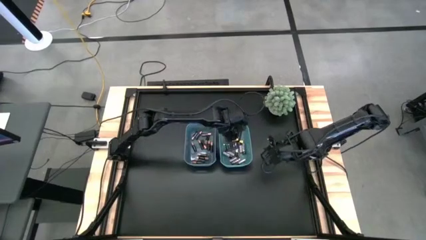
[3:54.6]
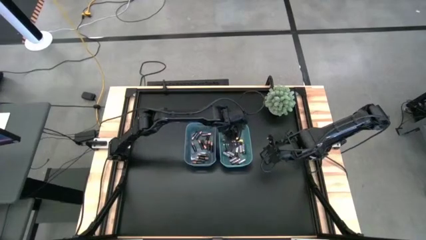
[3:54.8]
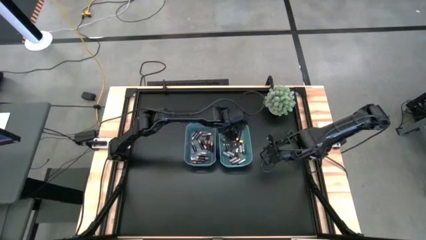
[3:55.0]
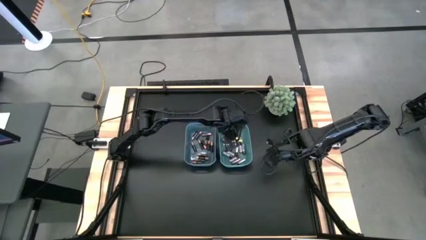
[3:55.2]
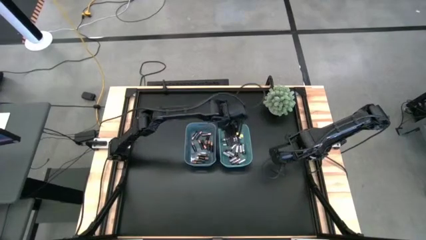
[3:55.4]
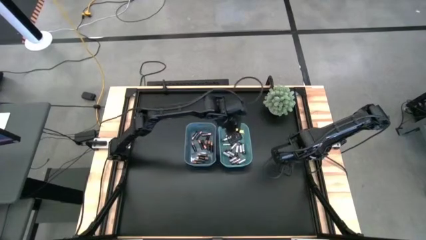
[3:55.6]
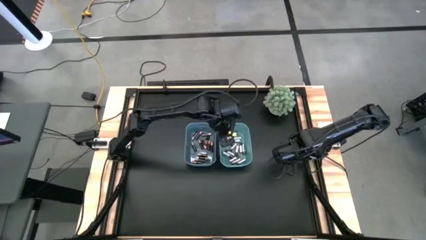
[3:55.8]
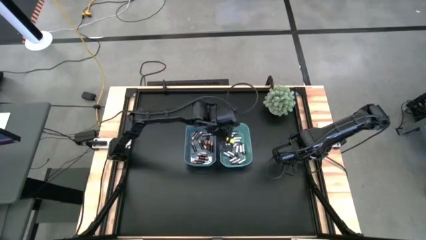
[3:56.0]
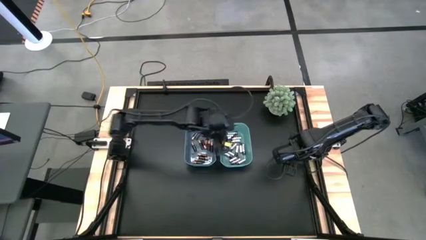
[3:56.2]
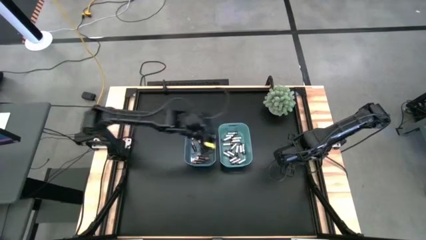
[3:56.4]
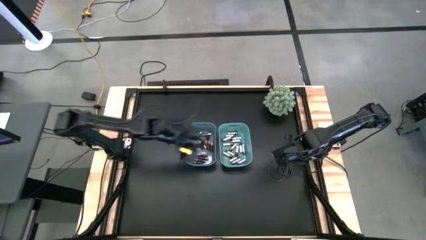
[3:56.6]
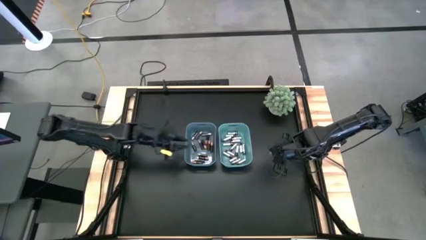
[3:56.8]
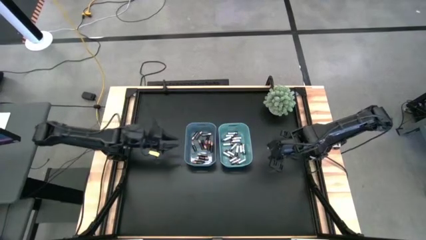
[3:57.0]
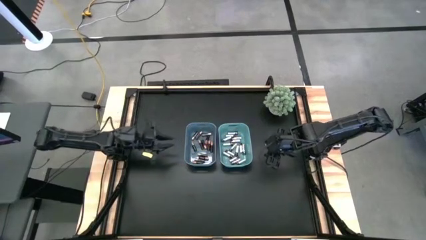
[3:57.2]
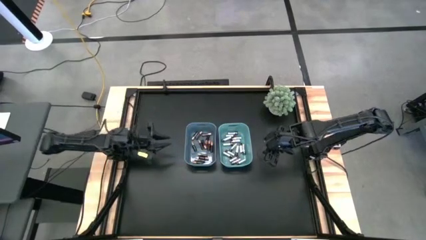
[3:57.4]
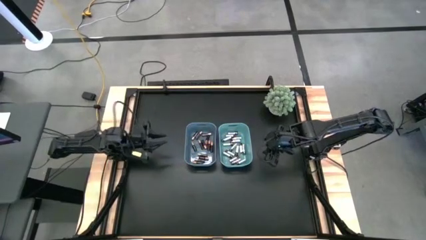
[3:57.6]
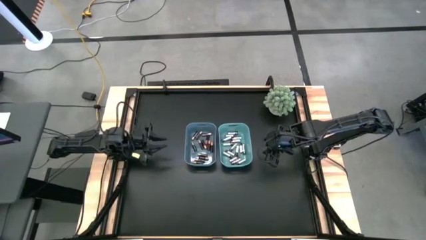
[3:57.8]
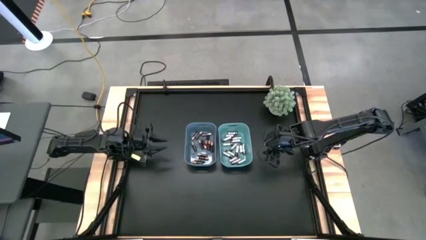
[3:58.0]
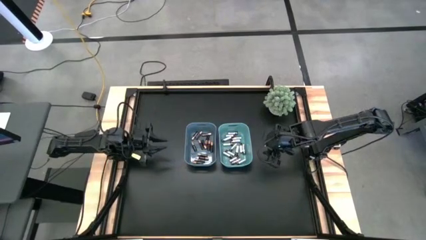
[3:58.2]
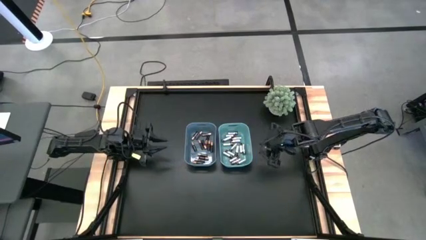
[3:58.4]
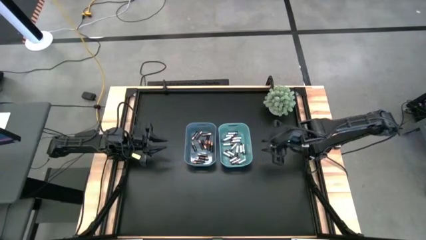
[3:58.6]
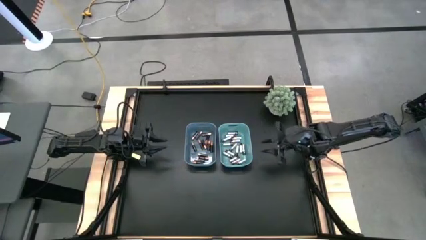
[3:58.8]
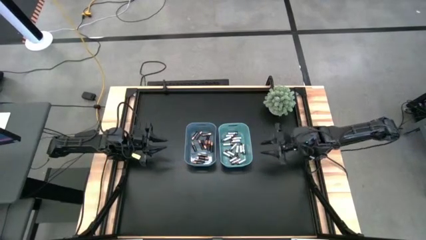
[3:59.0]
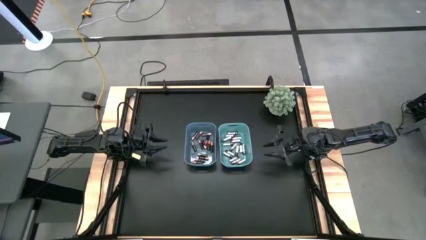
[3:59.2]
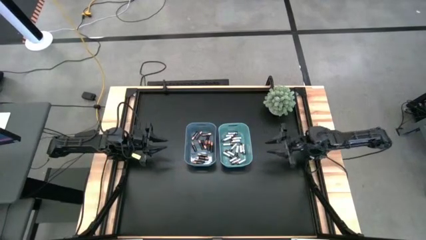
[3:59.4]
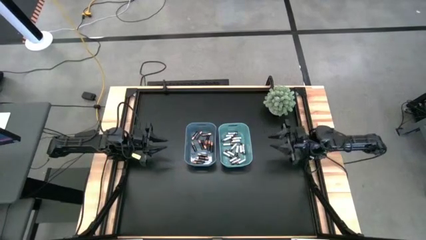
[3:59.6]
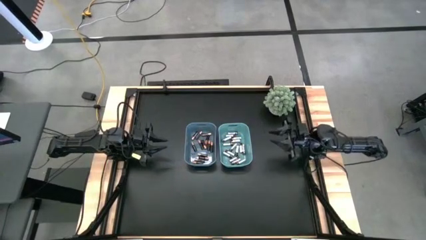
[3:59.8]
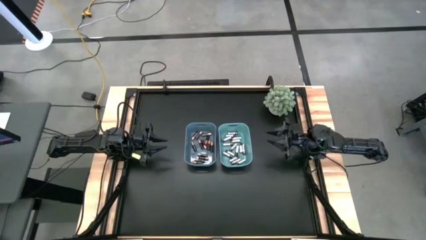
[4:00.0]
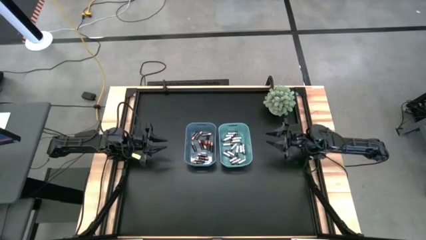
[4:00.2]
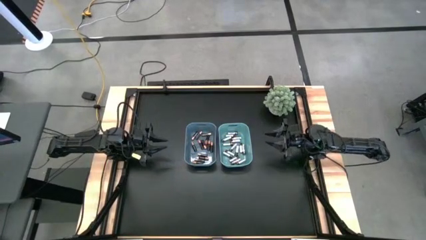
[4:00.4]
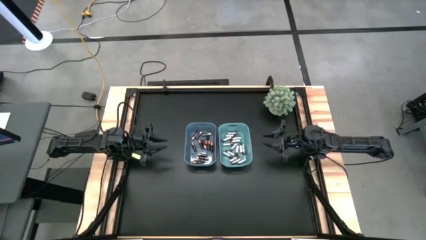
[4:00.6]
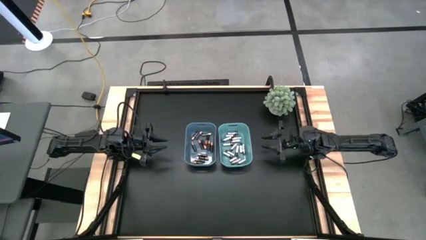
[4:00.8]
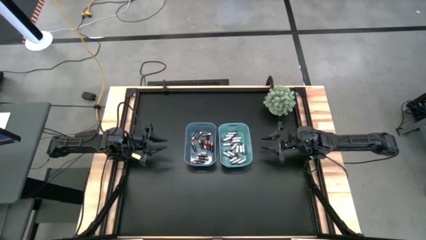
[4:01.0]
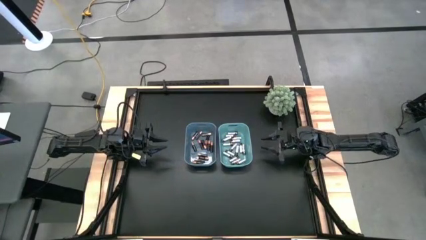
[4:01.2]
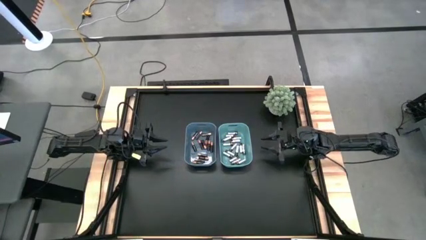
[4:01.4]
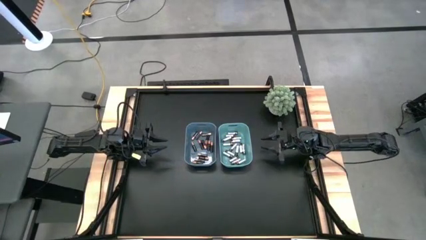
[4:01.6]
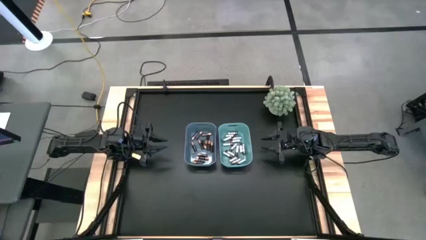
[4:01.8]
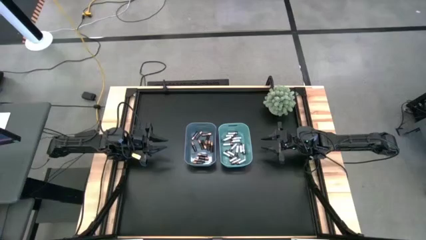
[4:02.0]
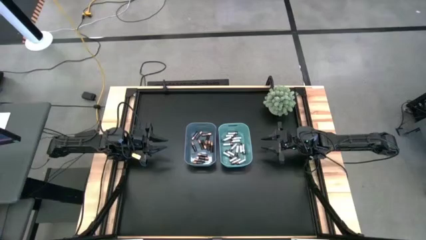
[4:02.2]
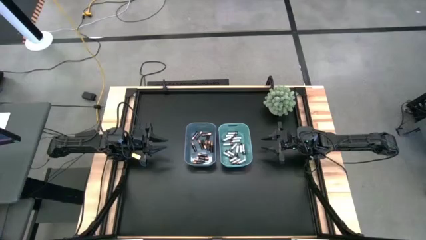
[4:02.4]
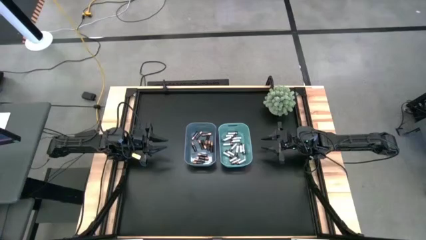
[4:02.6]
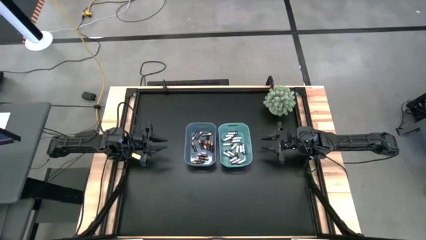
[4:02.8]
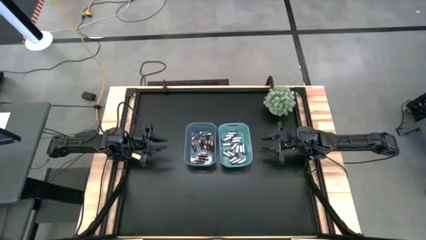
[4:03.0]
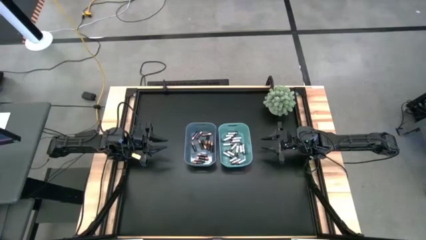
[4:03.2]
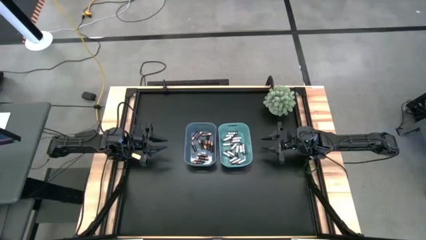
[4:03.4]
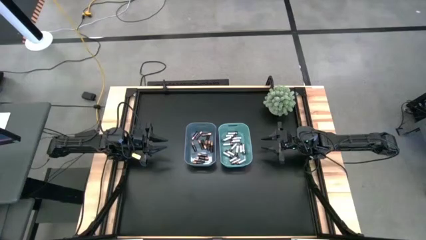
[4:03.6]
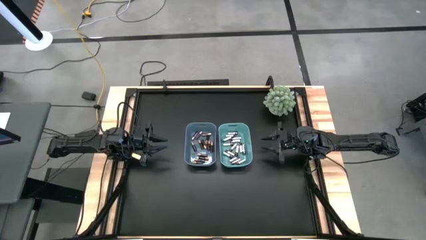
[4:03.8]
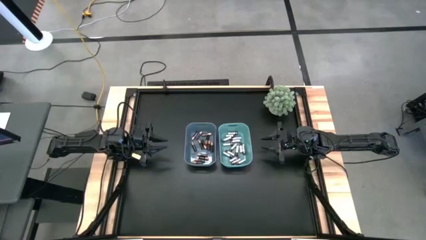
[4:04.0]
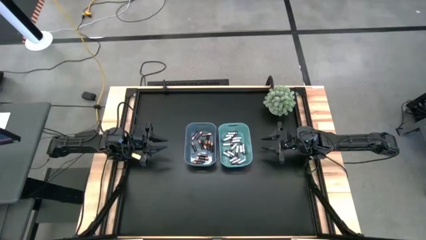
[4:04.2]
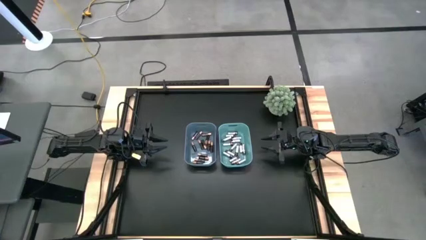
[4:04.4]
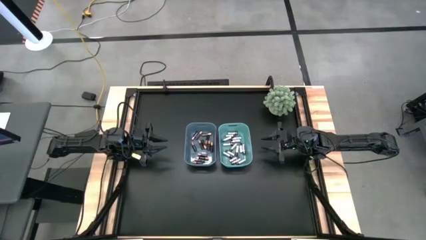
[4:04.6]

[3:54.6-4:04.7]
Task: Sort batteries
Return to Home Position

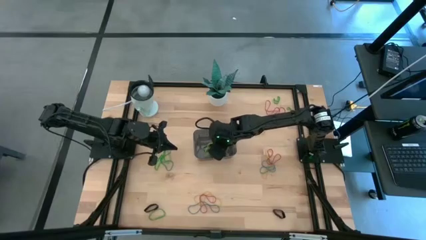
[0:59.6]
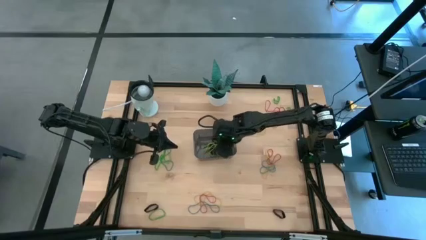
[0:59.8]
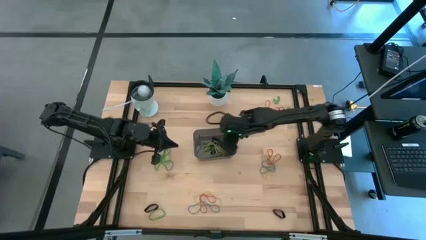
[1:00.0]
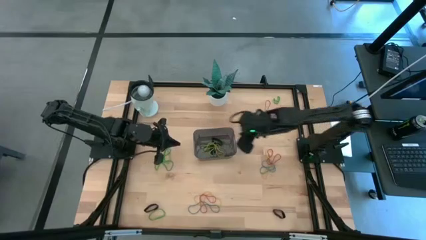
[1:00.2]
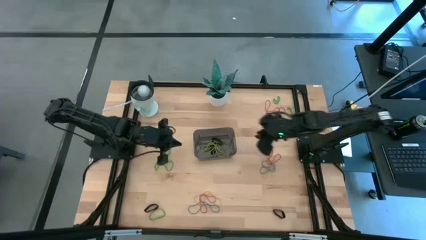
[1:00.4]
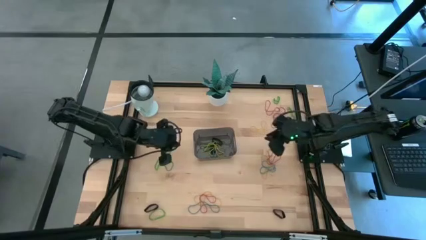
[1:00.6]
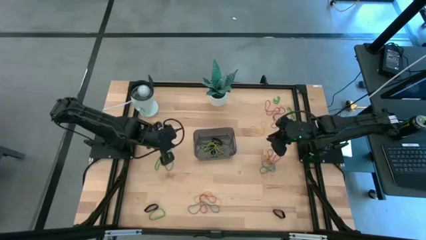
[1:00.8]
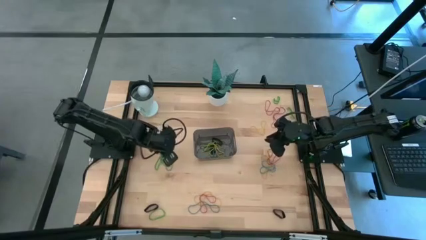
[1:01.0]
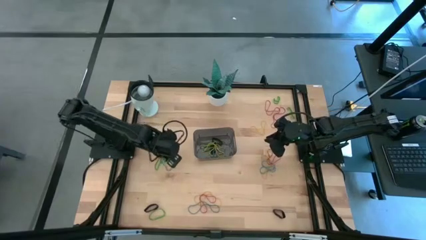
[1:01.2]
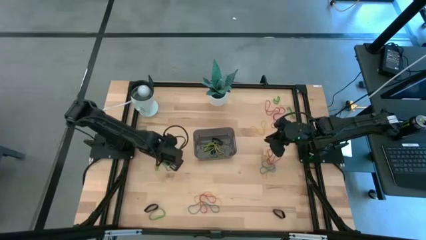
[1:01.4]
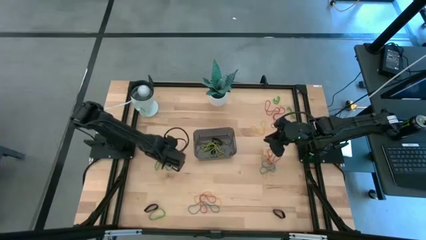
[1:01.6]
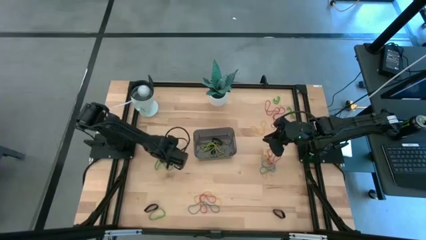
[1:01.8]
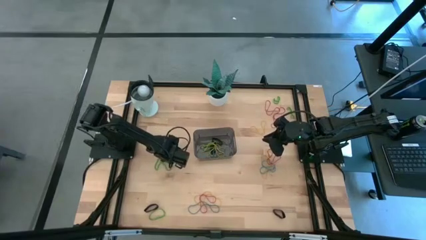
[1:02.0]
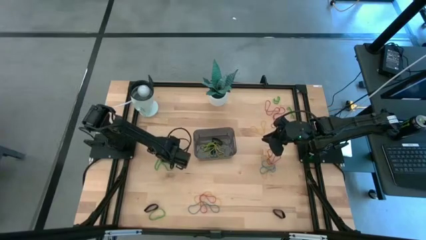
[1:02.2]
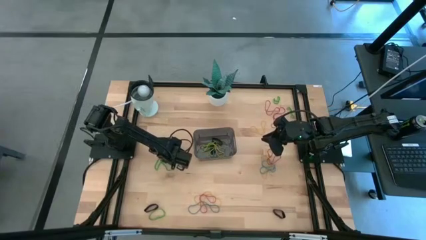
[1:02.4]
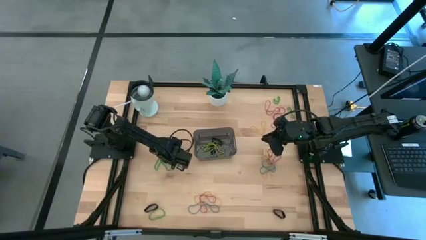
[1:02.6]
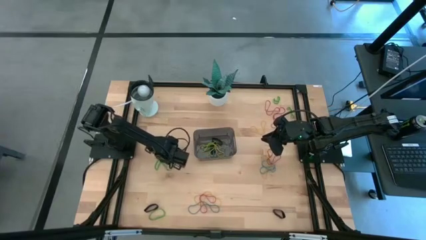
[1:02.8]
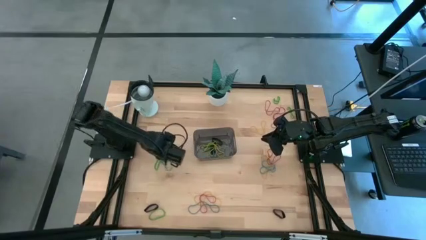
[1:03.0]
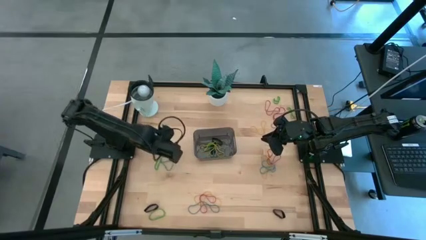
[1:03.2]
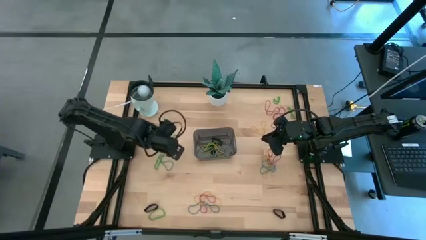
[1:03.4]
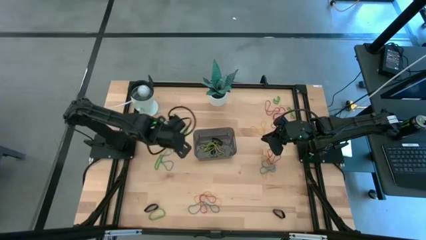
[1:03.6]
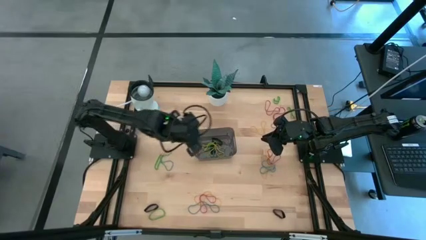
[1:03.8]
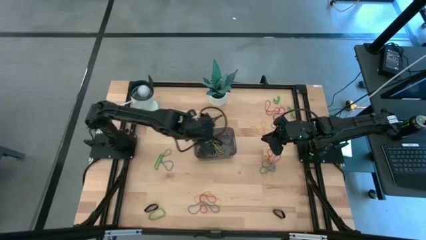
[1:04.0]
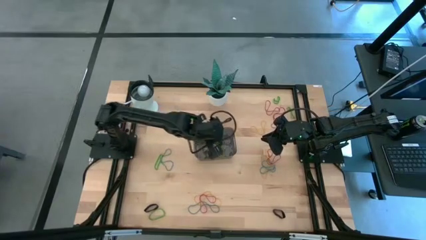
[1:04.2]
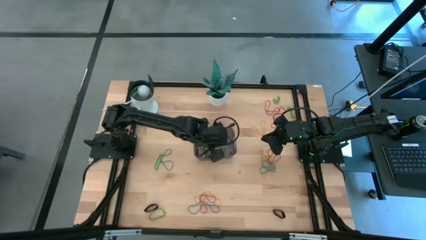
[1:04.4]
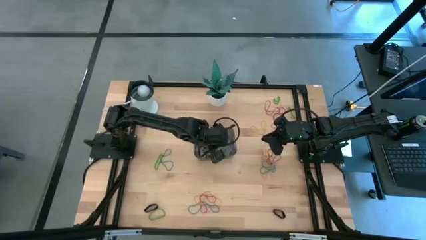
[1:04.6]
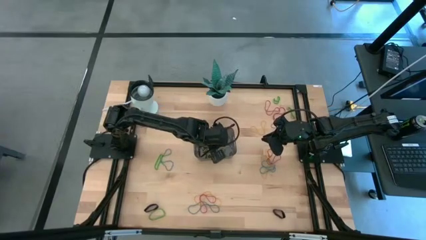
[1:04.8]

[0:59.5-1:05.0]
Task: Pick and place rubber bands into bin
Put the green rubber band into the black bin
